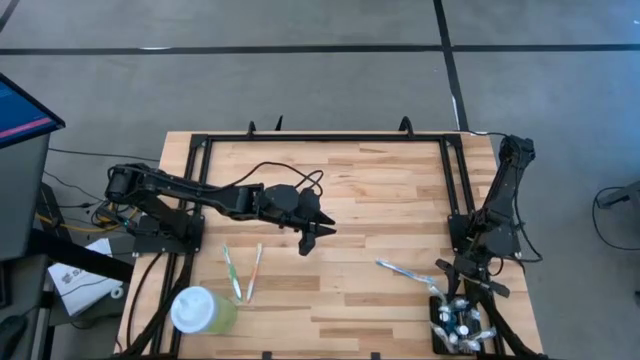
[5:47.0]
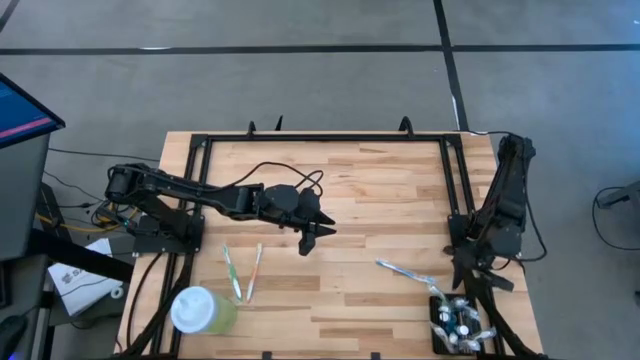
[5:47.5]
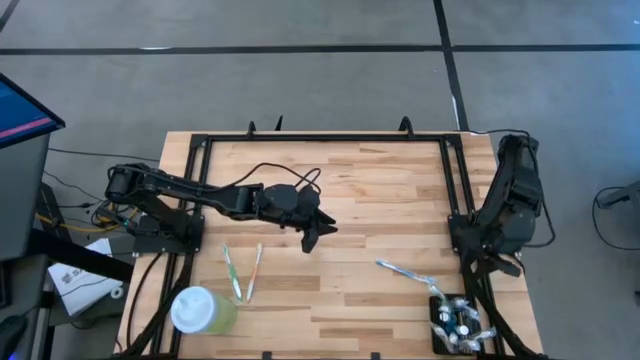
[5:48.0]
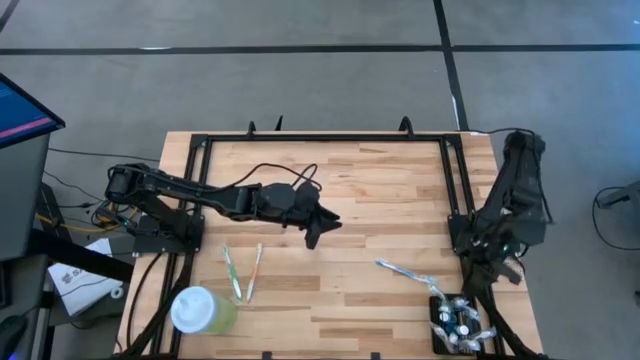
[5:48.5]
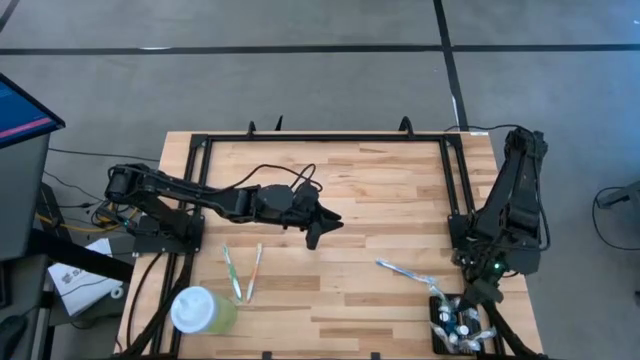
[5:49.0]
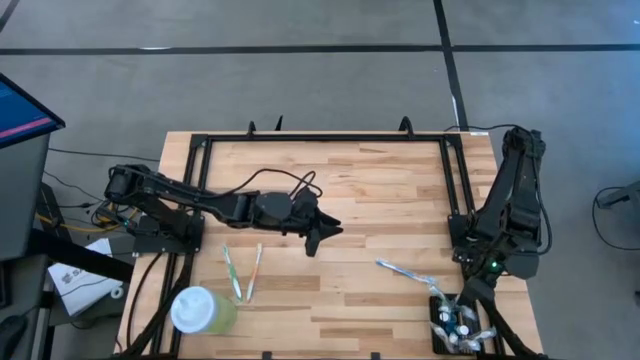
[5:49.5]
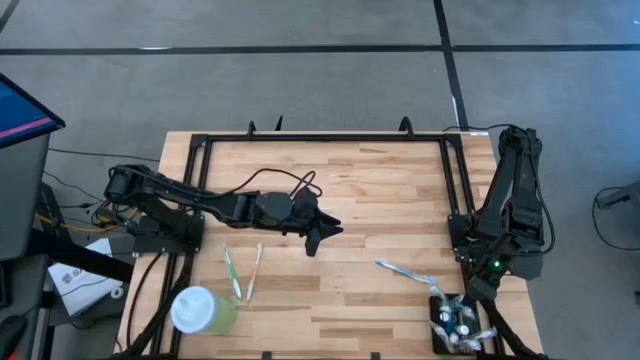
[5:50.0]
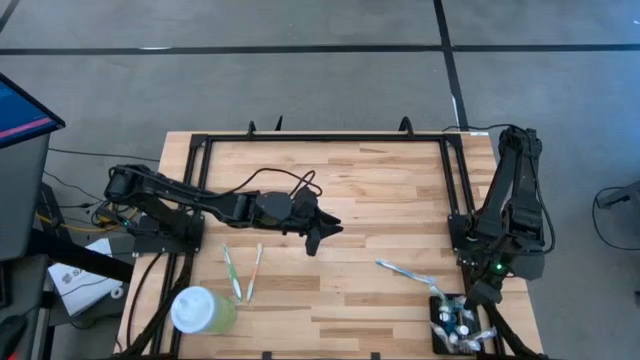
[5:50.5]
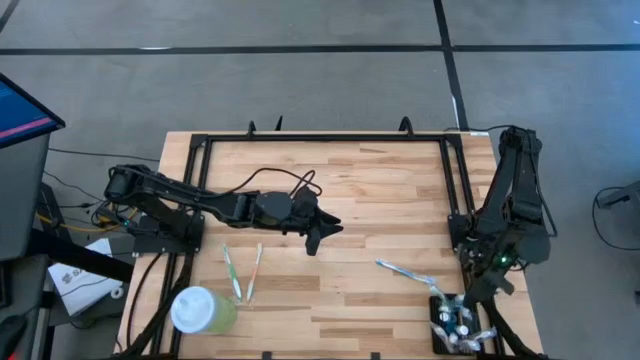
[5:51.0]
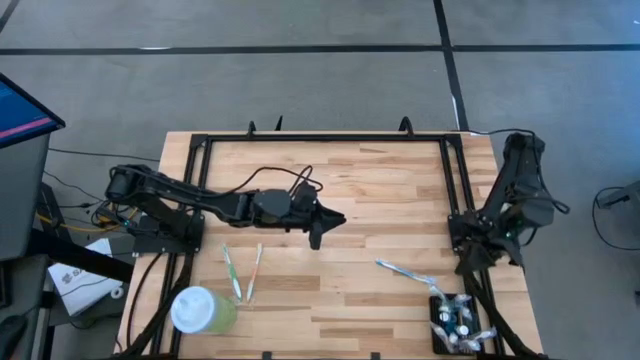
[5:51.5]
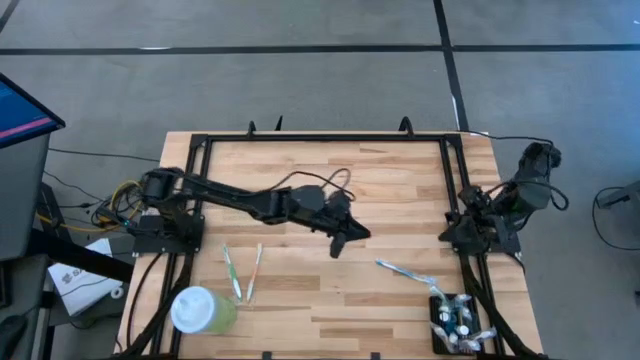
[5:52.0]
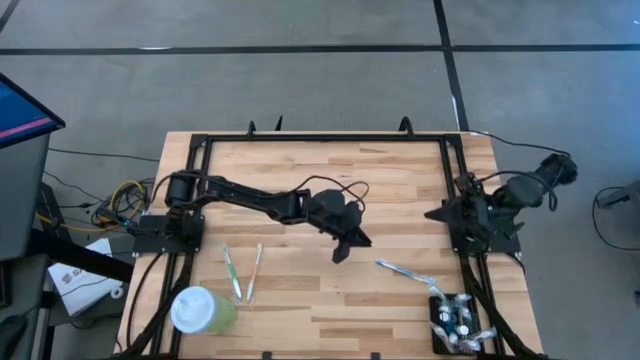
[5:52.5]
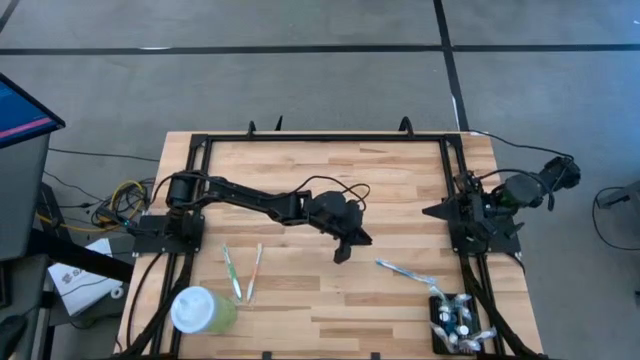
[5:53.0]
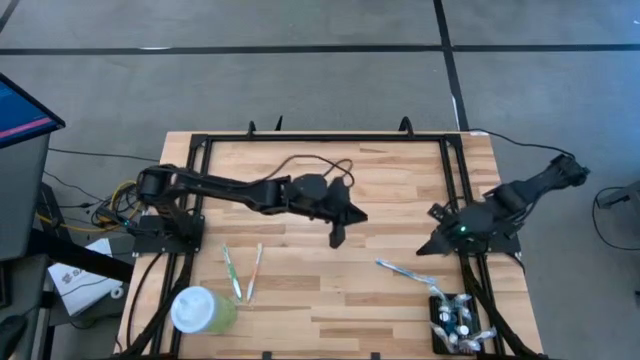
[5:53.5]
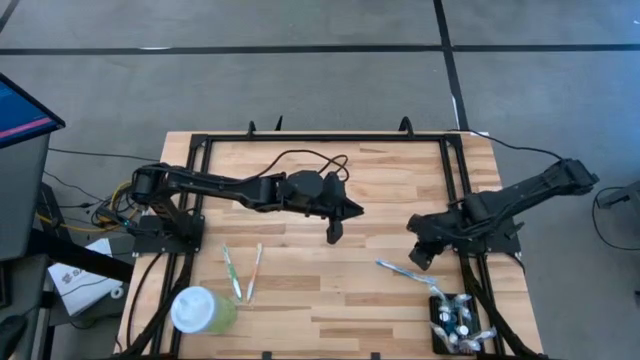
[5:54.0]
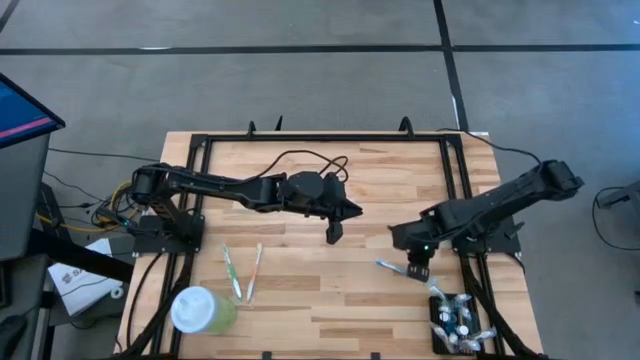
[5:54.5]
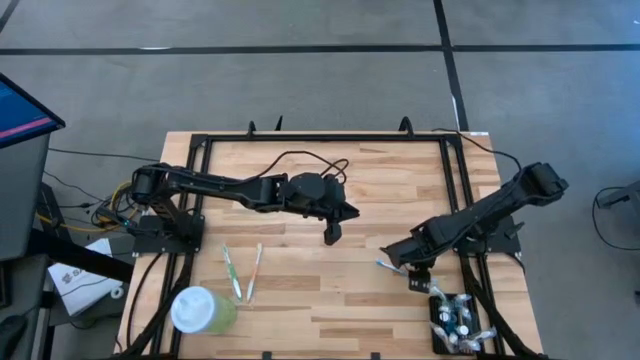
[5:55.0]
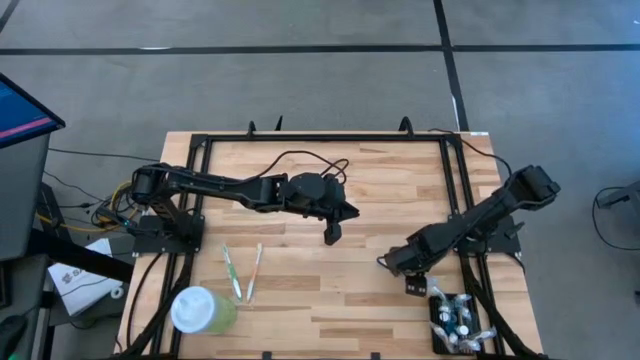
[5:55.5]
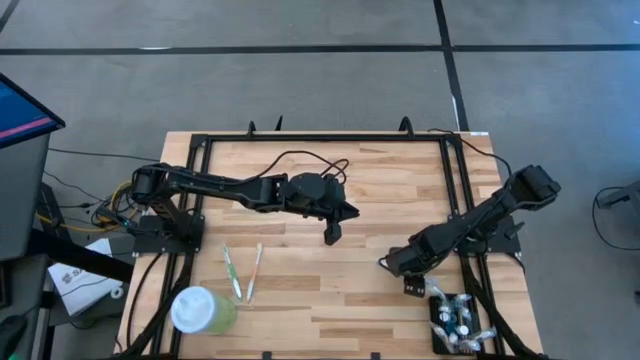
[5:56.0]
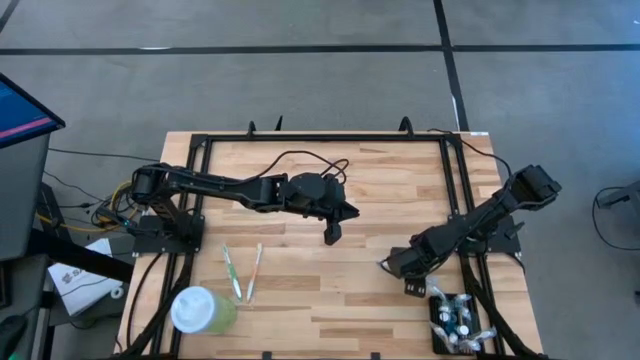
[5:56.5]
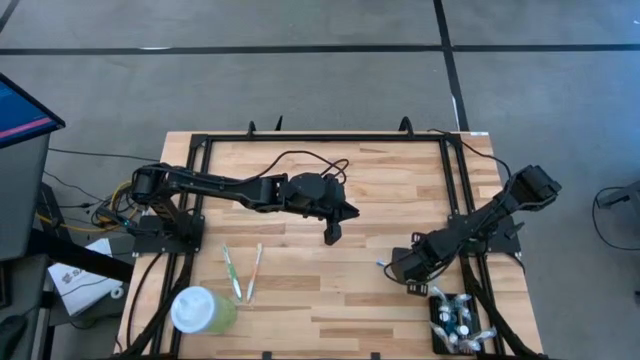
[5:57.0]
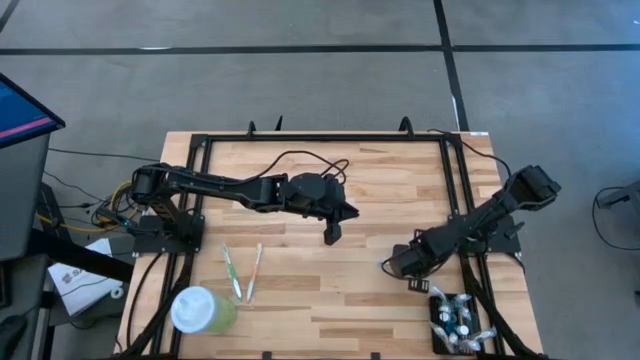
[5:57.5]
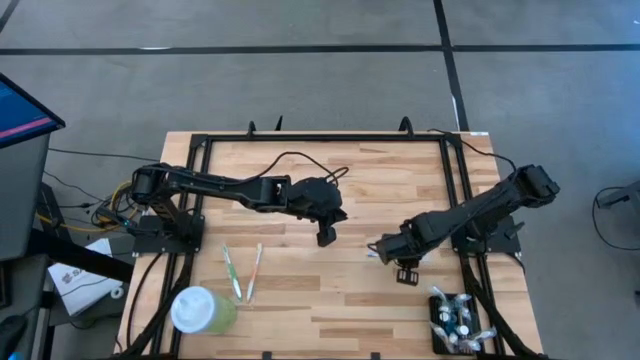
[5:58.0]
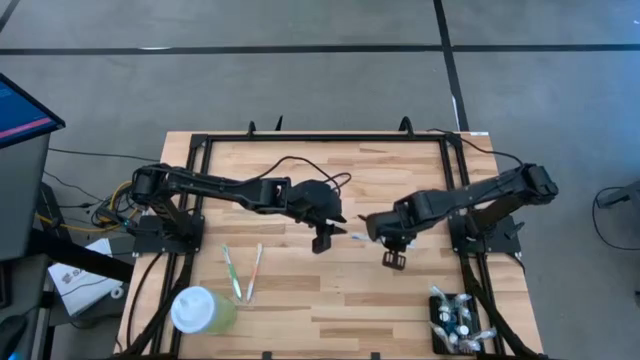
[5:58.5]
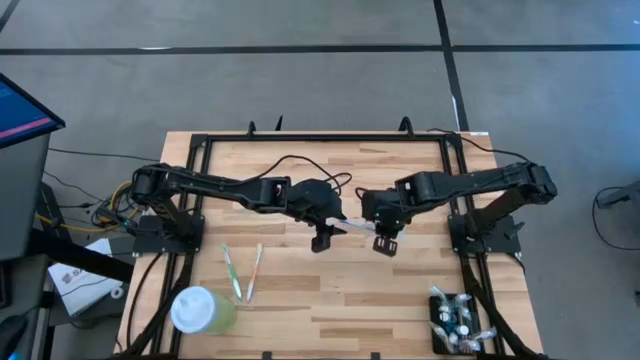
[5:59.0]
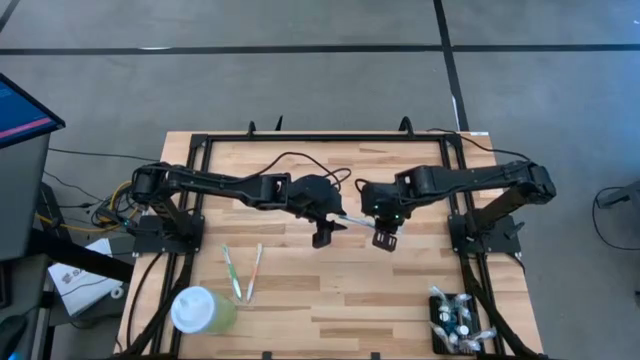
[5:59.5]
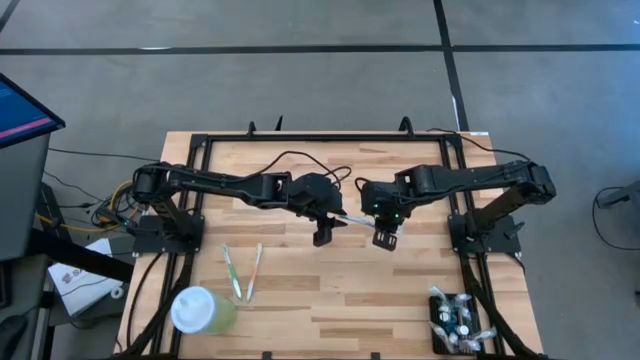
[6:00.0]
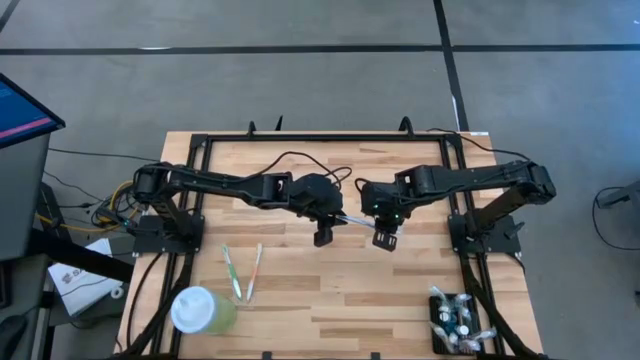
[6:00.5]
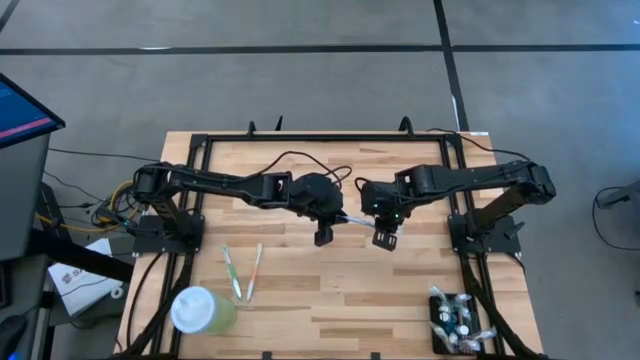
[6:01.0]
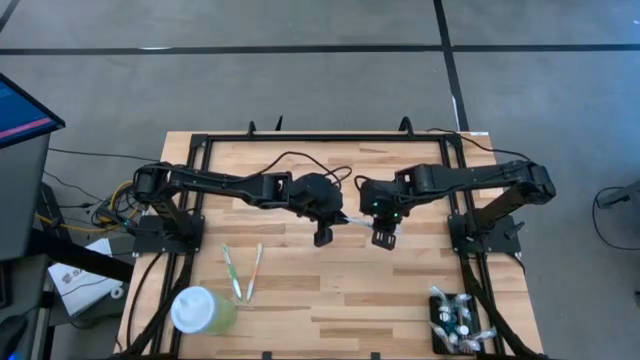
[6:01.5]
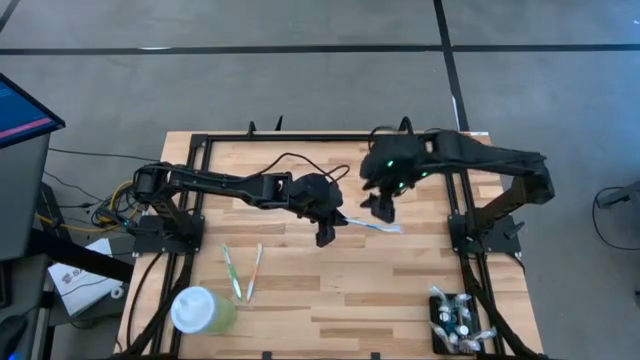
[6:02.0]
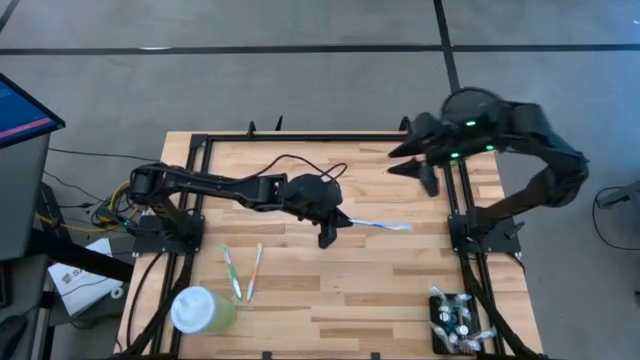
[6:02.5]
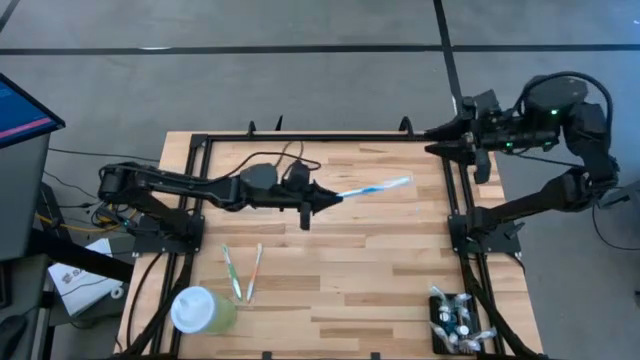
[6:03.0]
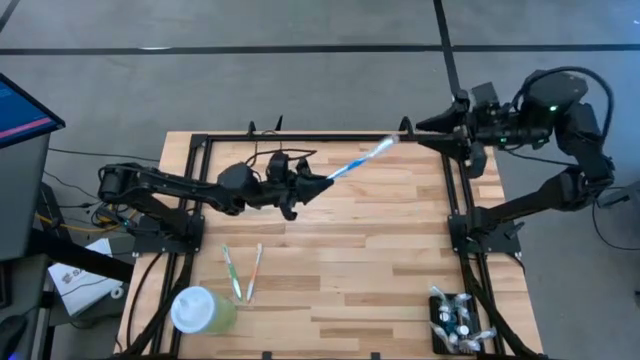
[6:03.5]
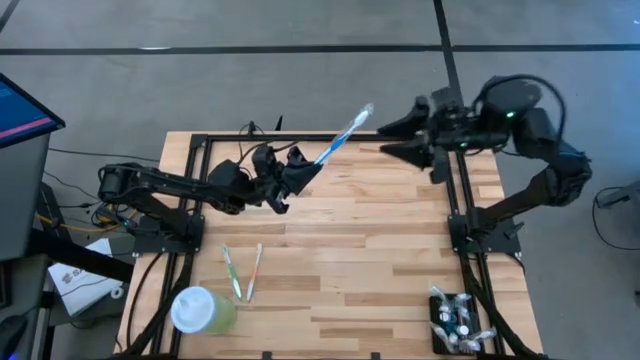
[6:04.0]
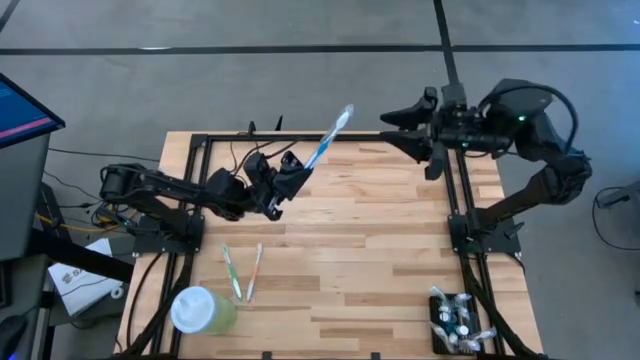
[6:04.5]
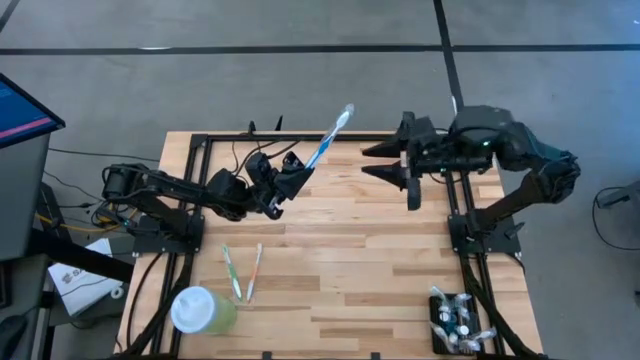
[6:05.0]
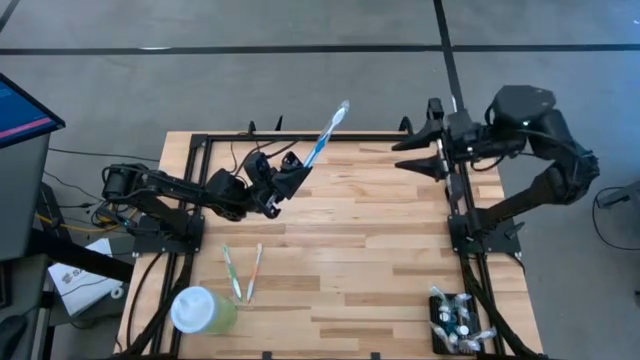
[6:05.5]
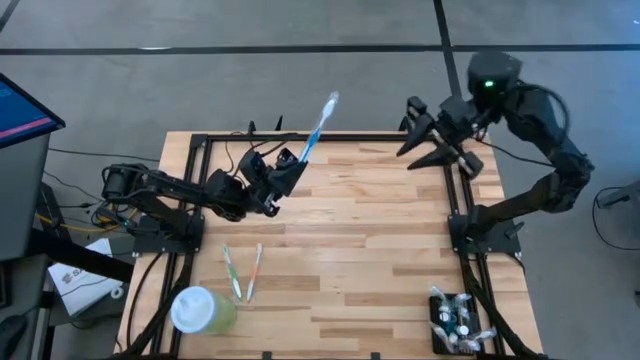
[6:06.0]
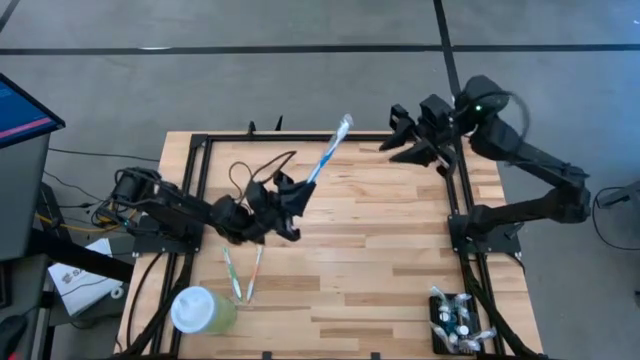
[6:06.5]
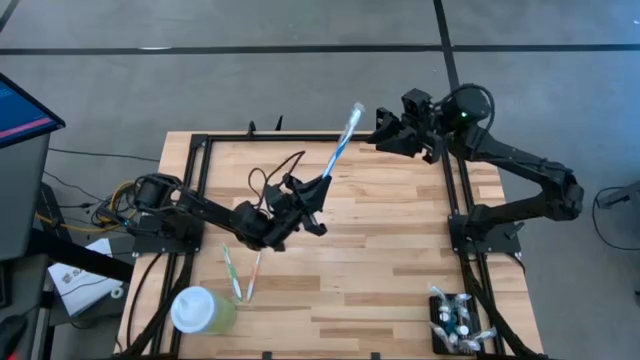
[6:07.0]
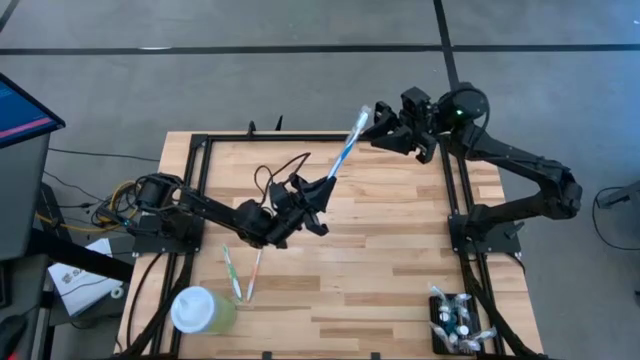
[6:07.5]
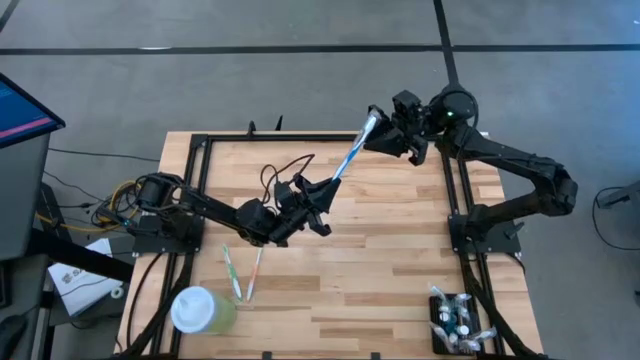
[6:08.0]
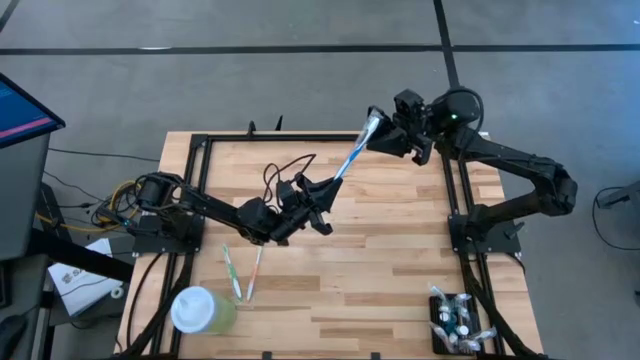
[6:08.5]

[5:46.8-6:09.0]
Task: Pick & Place toothbrushing station
Put the blue toothbrush into the black organizer
